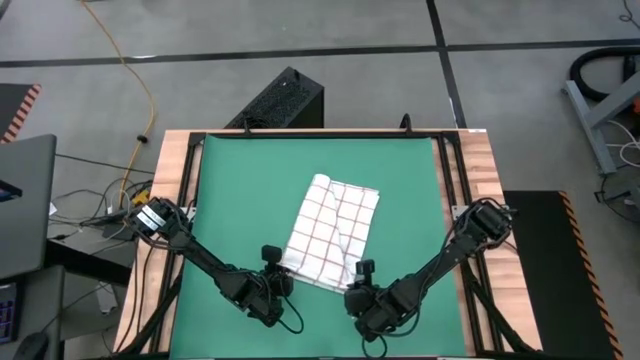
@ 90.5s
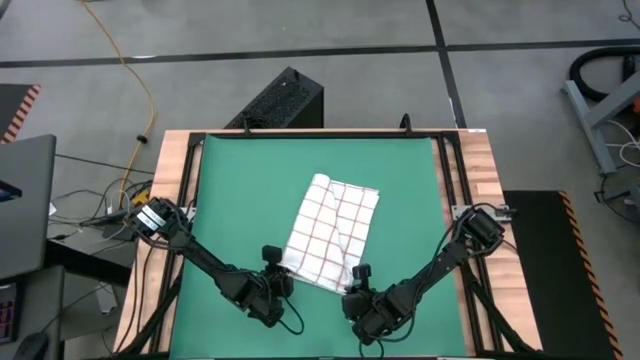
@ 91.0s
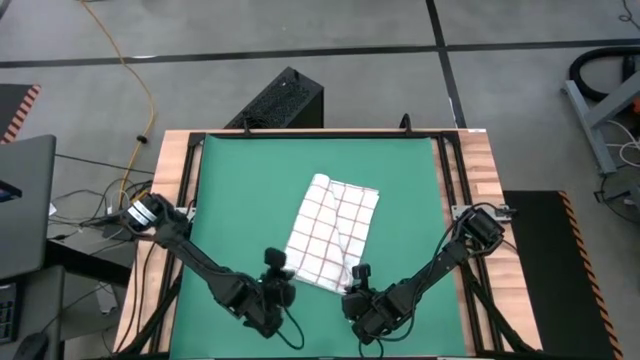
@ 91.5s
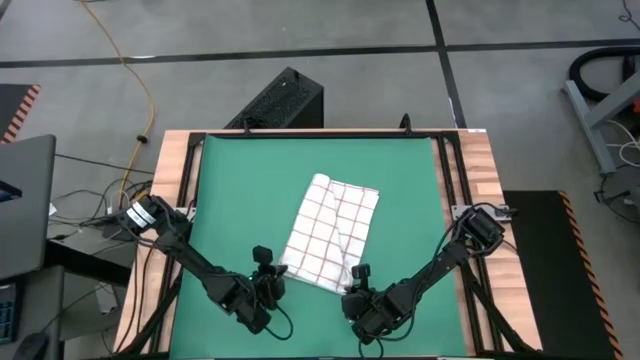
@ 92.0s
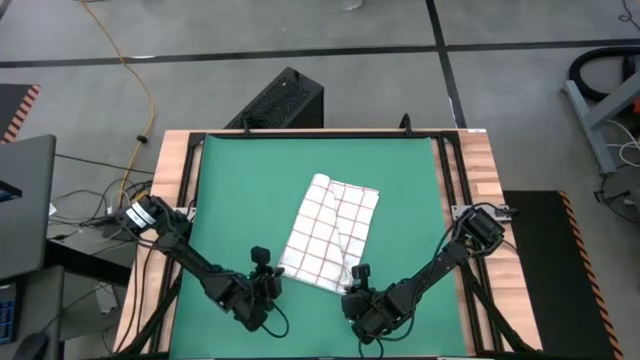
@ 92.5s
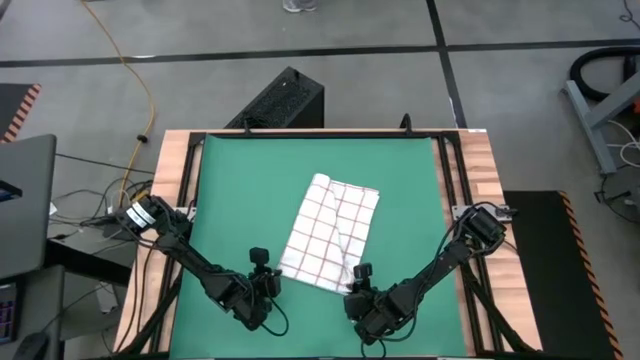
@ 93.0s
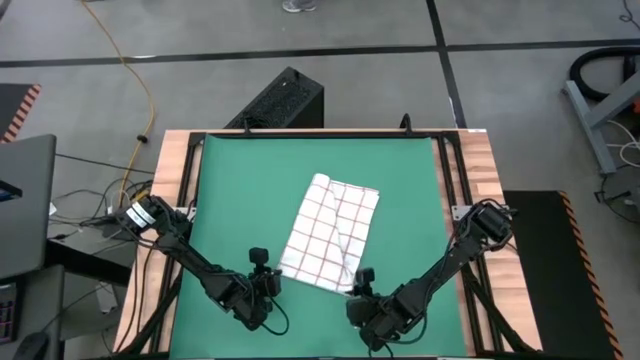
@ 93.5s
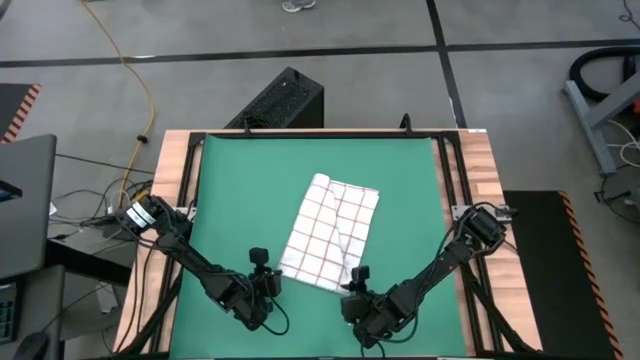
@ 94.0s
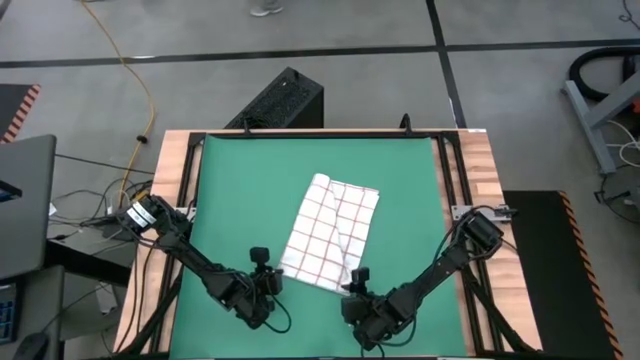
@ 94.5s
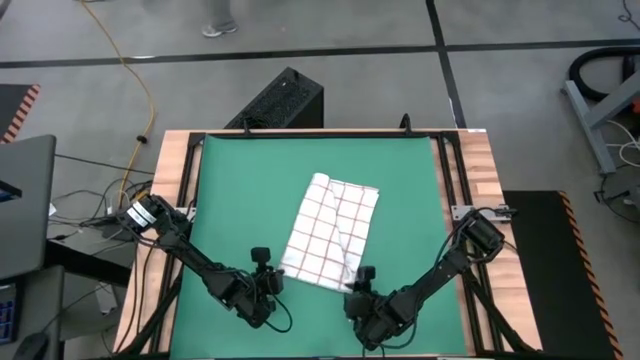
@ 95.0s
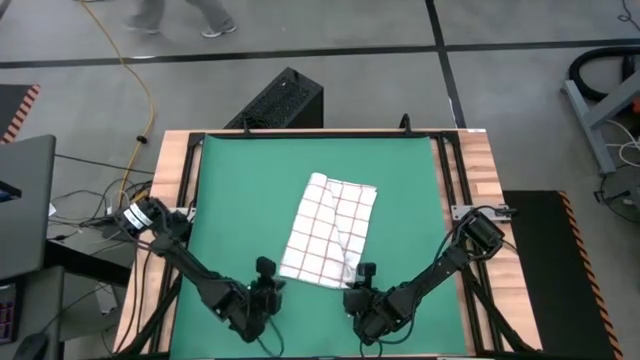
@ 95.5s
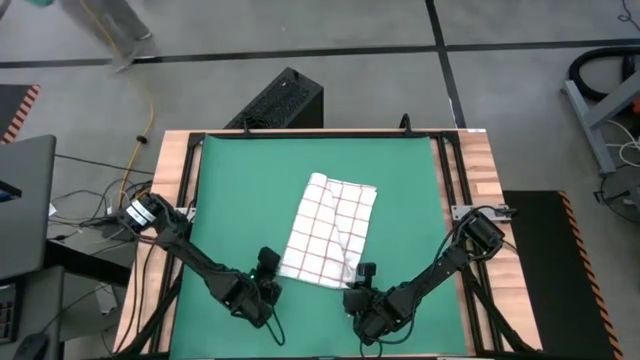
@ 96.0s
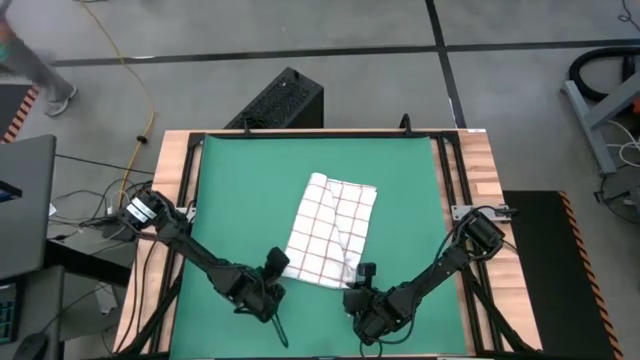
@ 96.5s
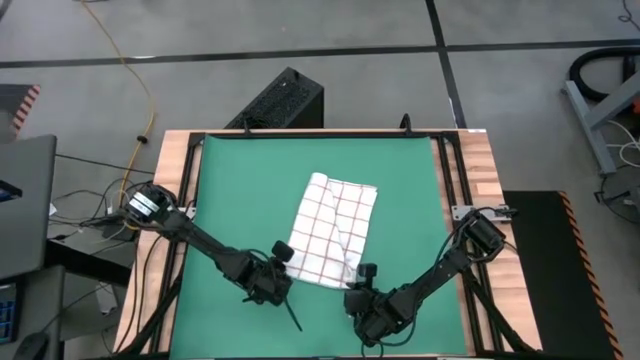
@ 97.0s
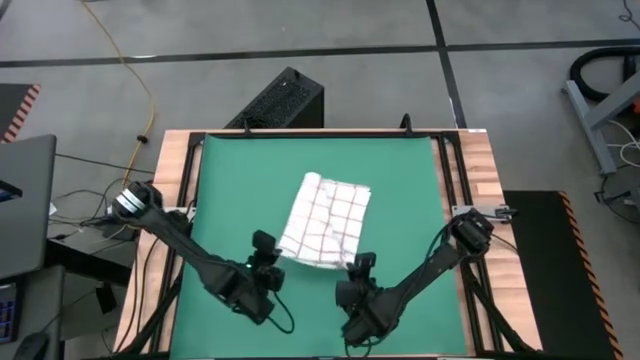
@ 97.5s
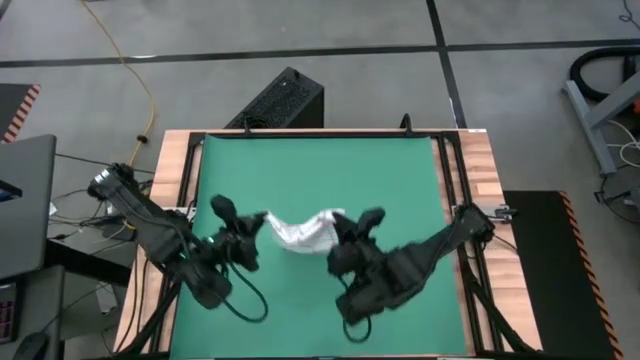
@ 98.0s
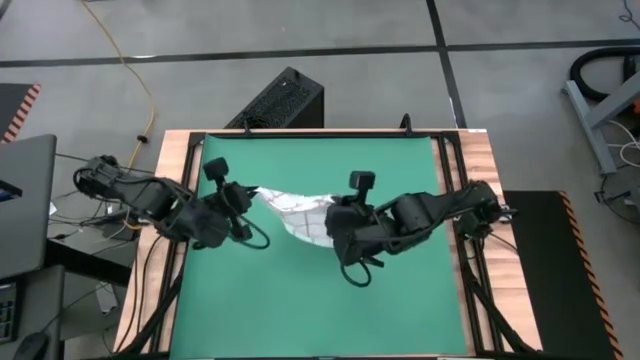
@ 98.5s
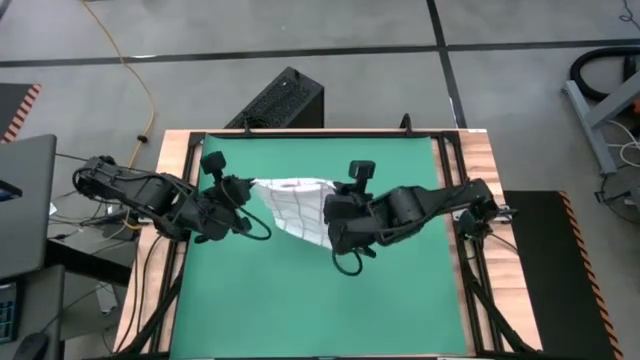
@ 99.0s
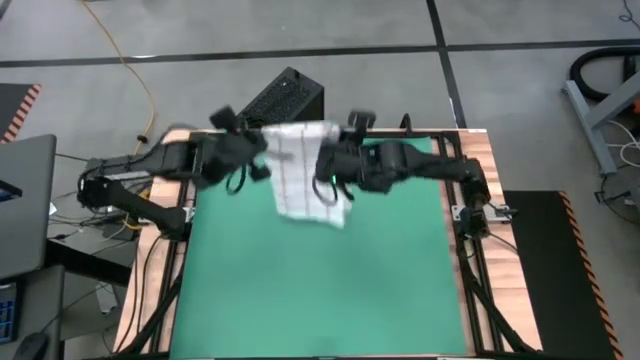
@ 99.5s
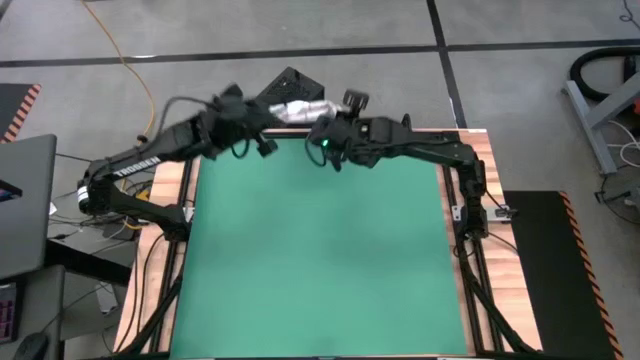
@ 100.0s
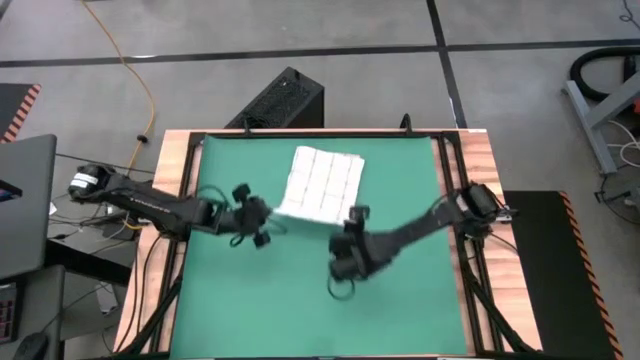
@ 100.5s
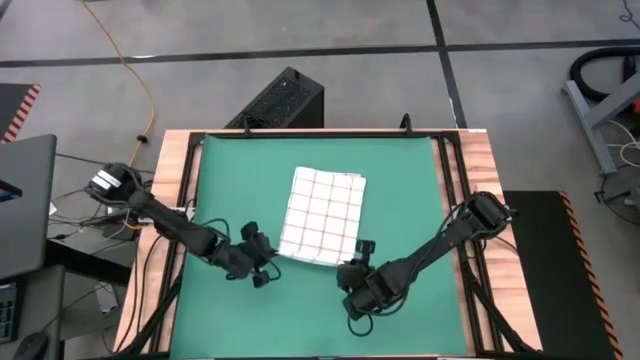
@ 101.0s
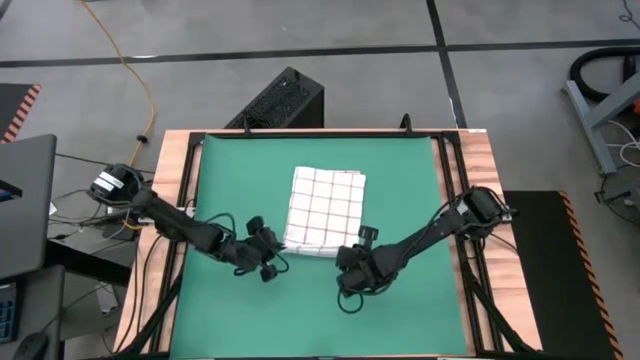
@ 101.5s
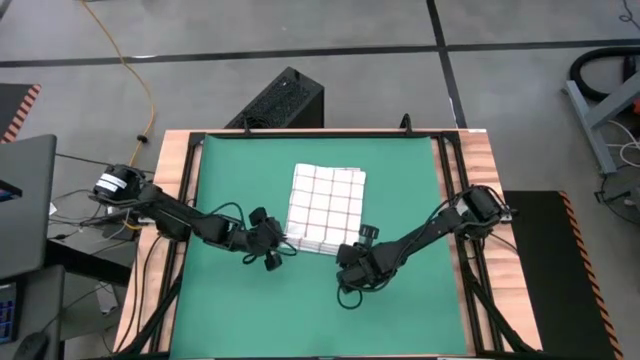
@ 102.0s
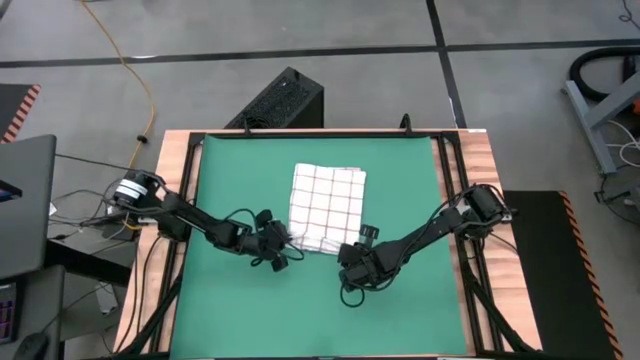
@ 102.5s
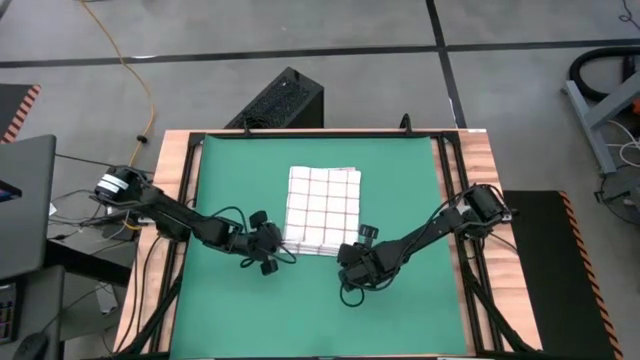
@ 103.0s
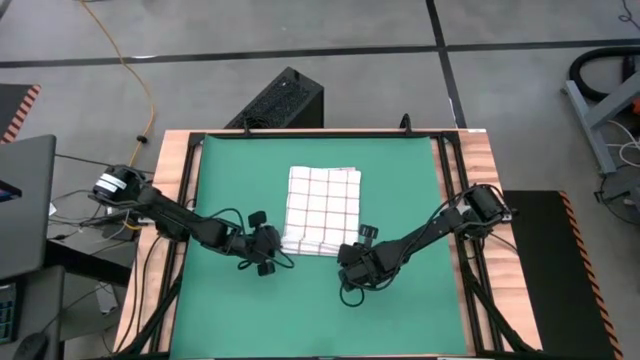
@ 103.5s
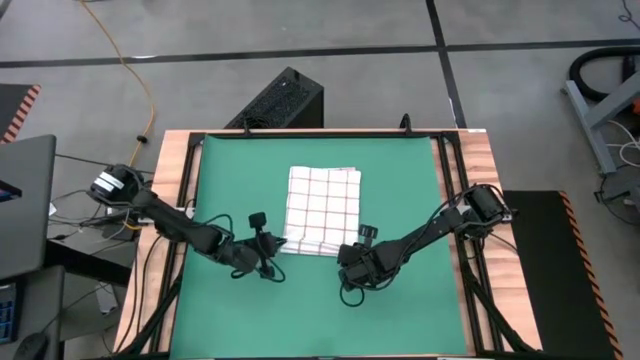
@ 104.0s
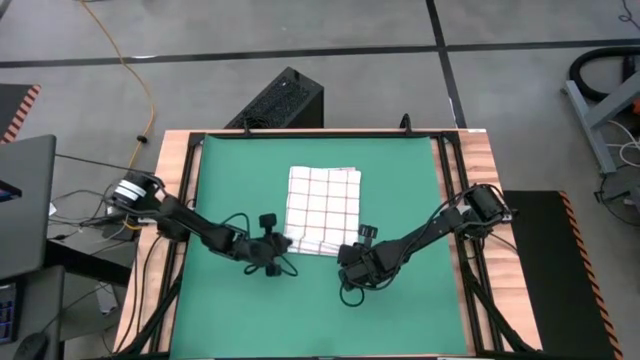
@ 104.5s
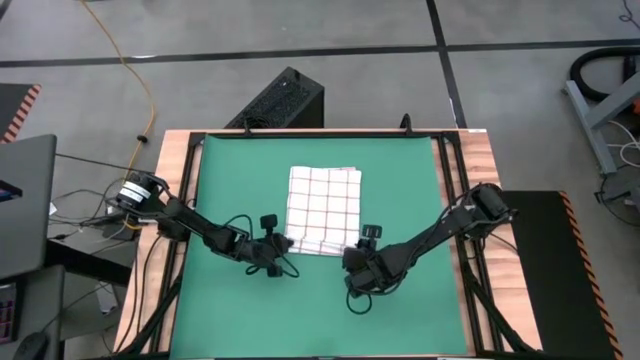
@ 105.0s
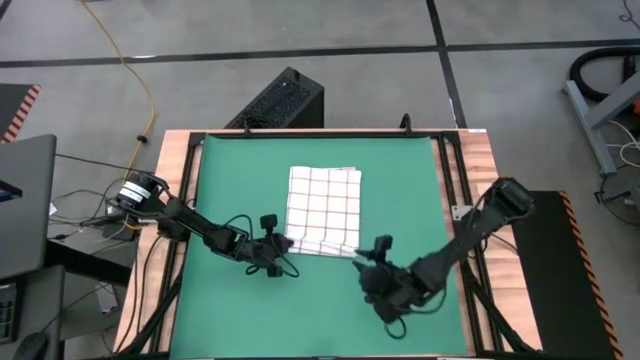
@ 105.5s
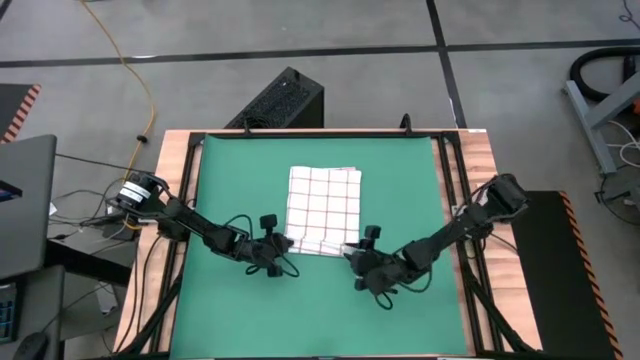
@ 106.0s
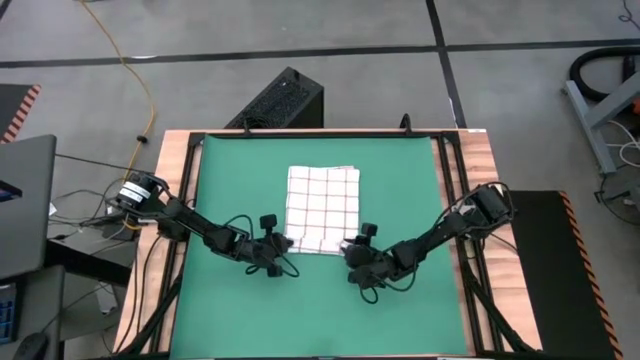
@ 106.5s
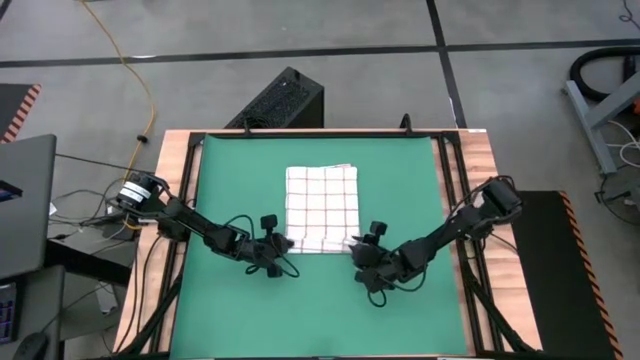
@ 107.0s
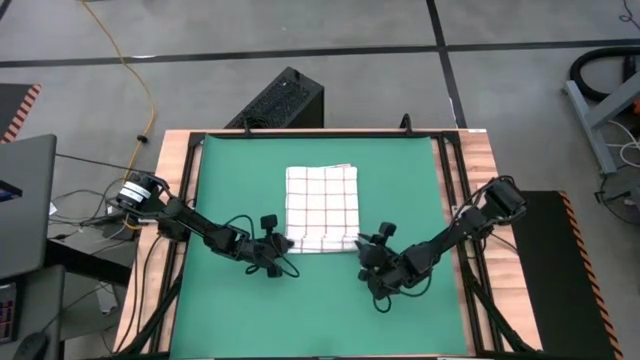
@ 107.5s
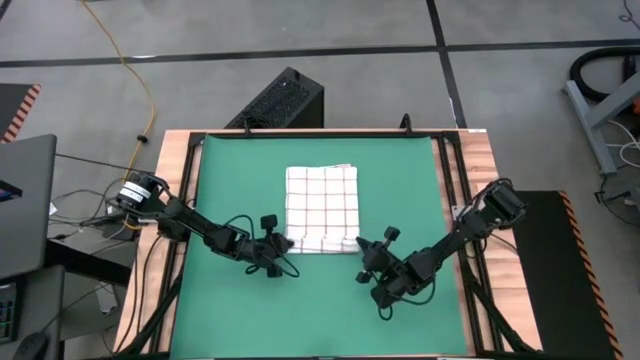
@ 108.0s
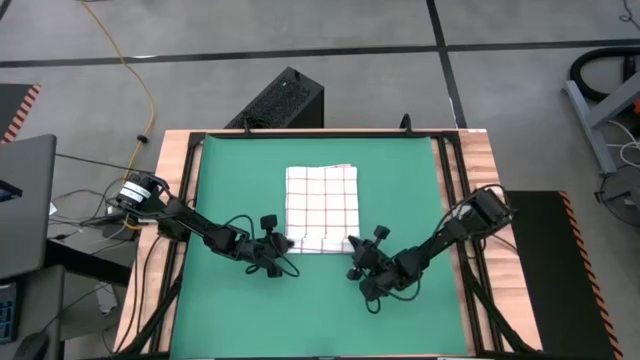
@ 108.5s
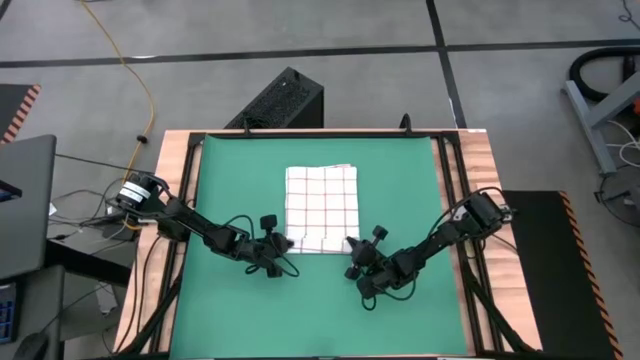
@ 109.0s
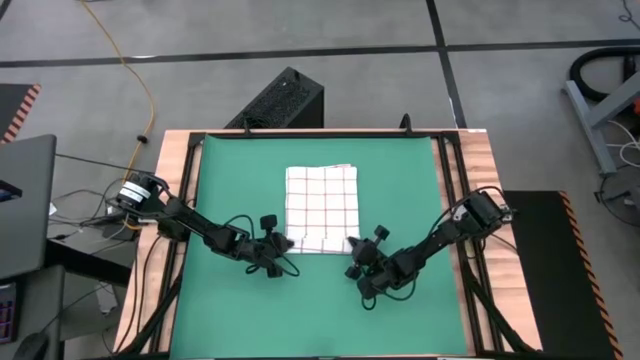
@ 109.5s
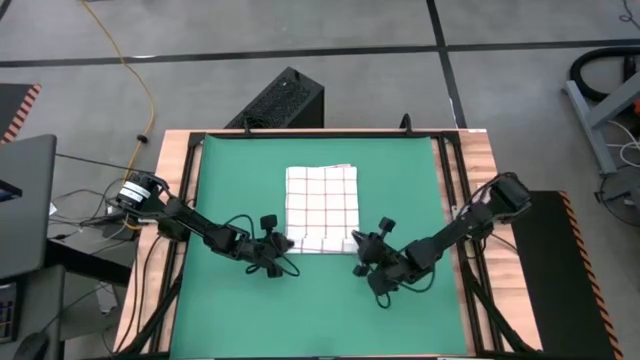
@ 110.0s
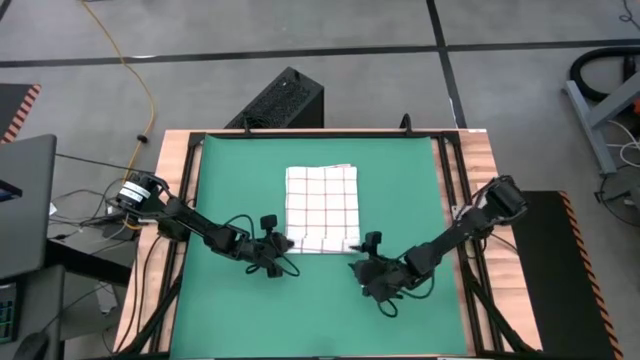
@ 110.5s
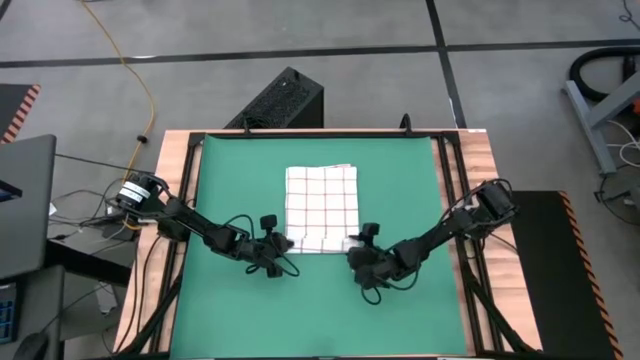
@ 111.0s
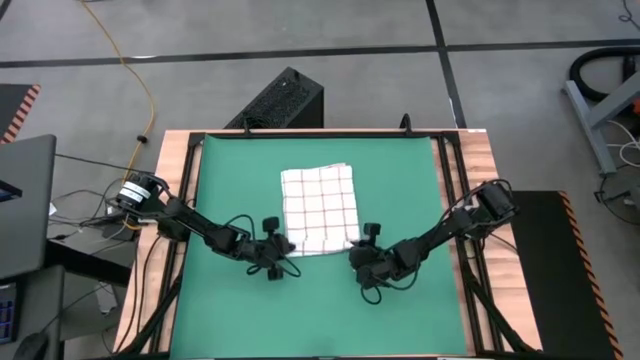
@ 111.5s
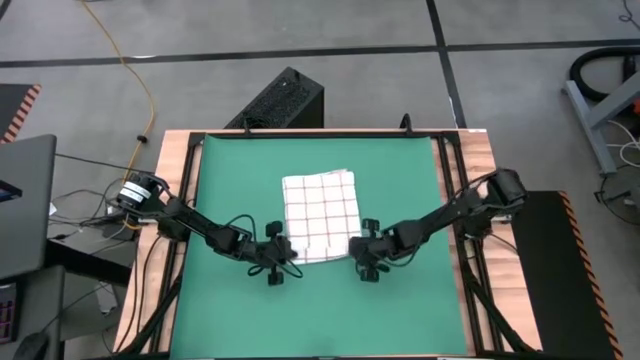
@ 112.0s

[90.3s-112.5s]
Task: Roll towel into tight, uniform cylinder
Fold the white towel
